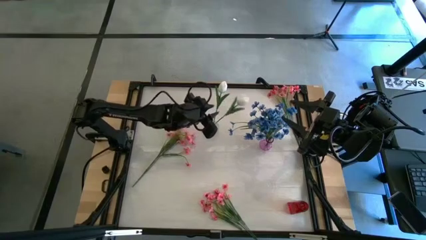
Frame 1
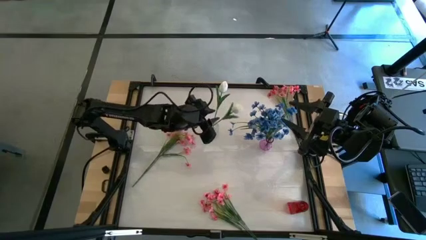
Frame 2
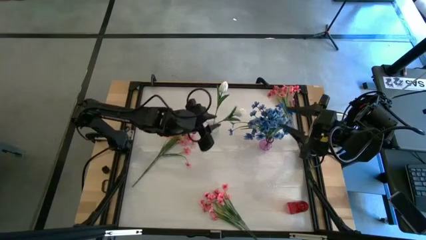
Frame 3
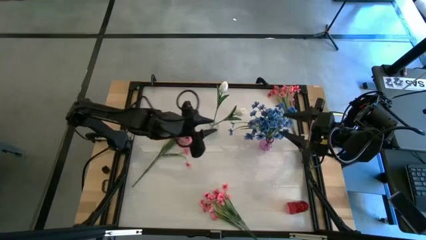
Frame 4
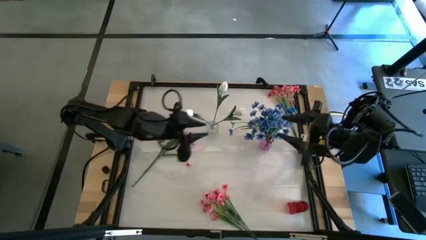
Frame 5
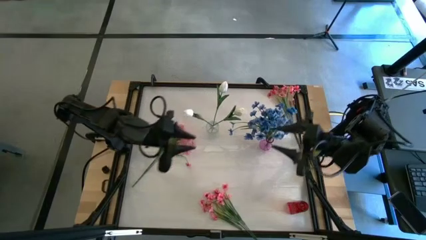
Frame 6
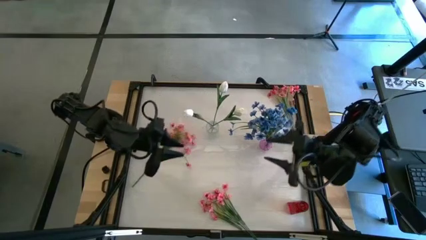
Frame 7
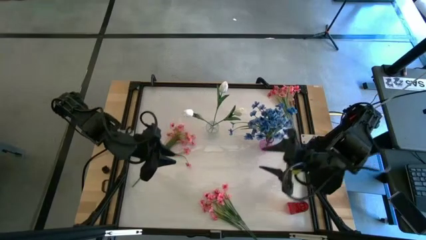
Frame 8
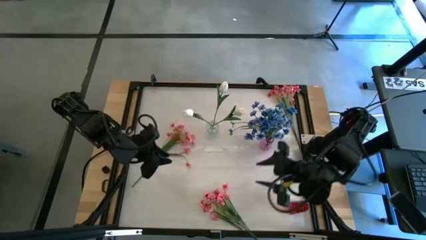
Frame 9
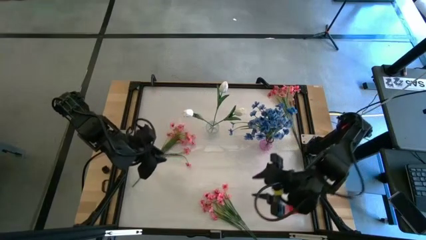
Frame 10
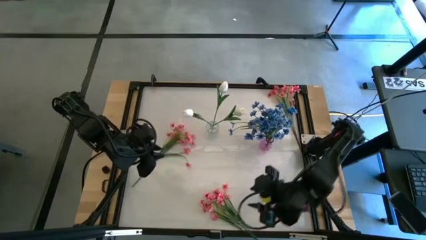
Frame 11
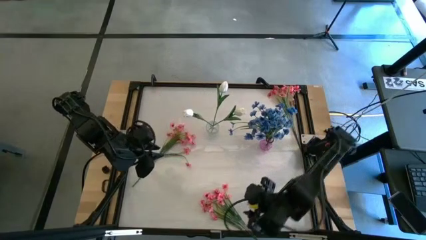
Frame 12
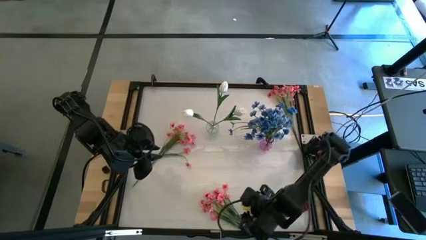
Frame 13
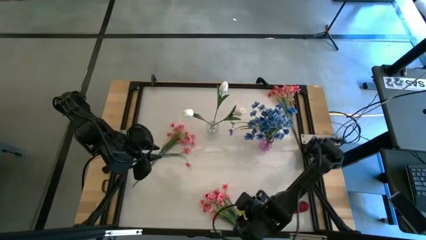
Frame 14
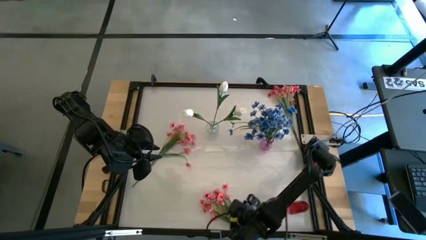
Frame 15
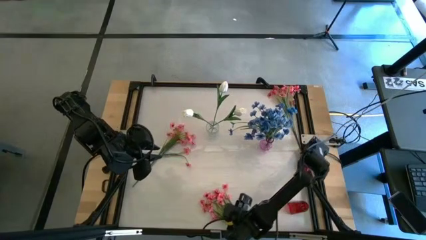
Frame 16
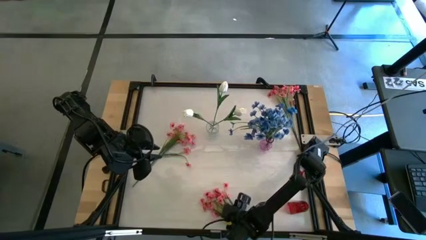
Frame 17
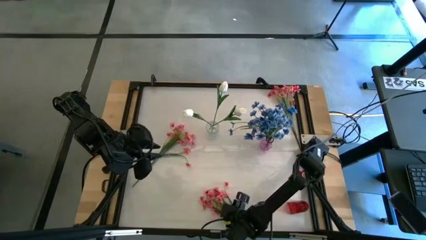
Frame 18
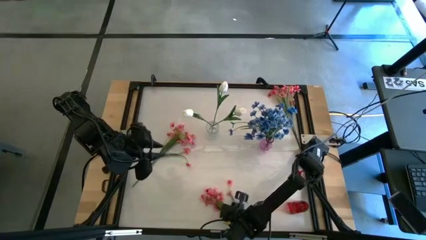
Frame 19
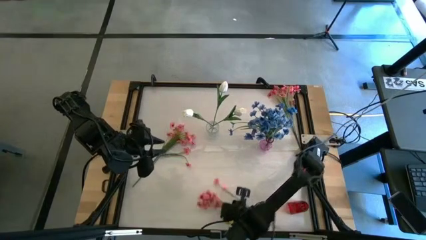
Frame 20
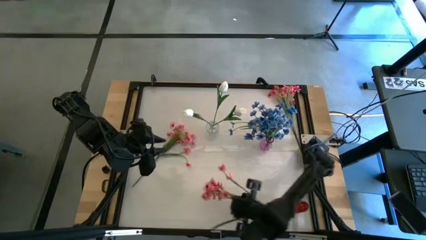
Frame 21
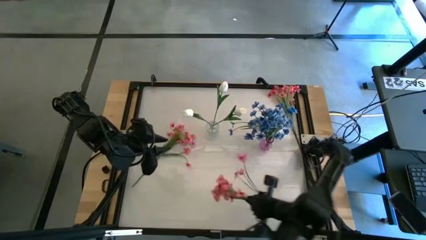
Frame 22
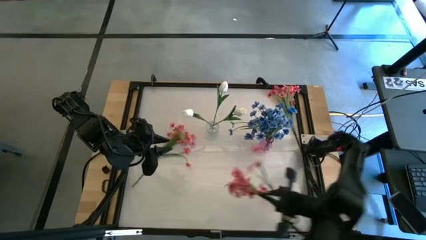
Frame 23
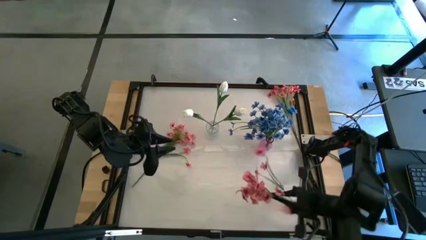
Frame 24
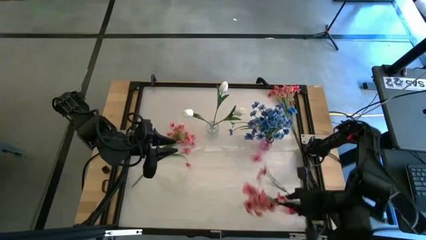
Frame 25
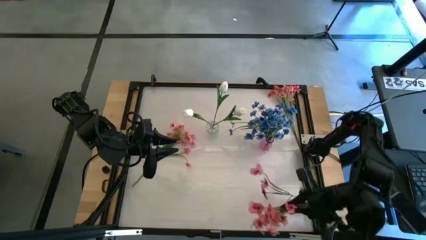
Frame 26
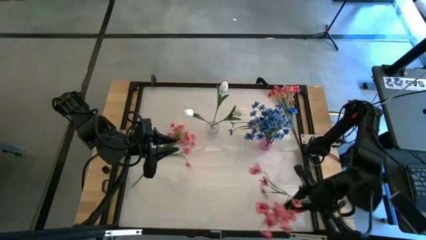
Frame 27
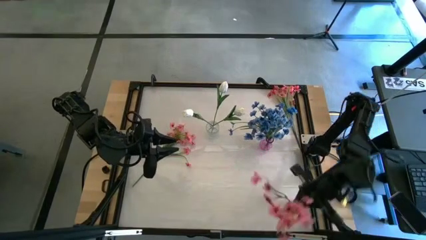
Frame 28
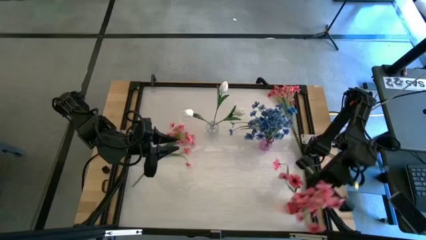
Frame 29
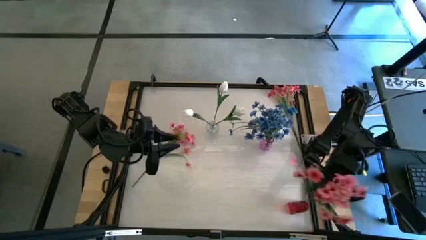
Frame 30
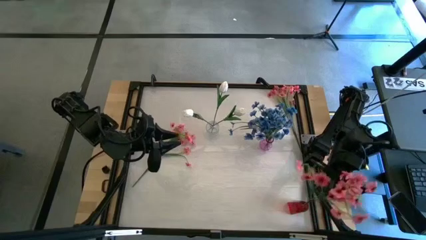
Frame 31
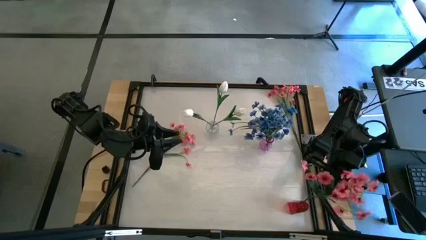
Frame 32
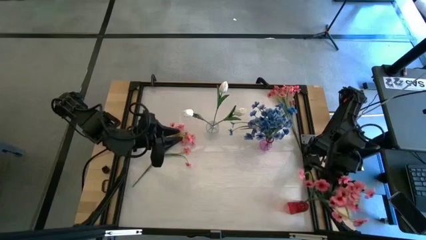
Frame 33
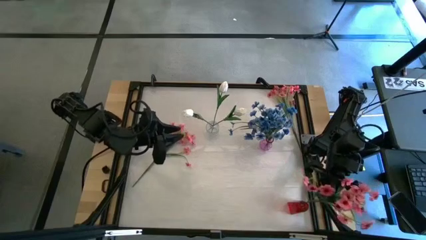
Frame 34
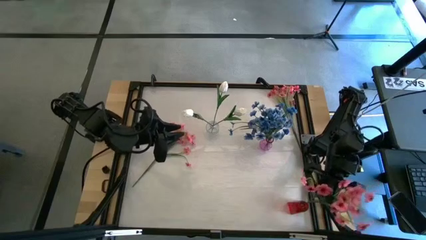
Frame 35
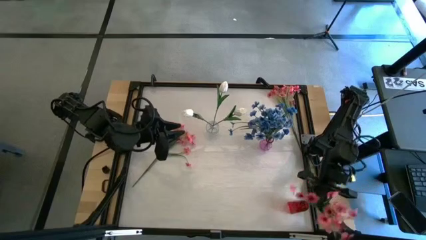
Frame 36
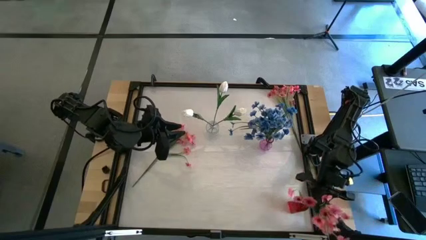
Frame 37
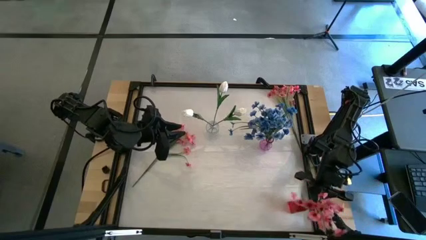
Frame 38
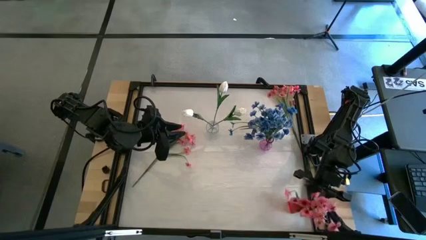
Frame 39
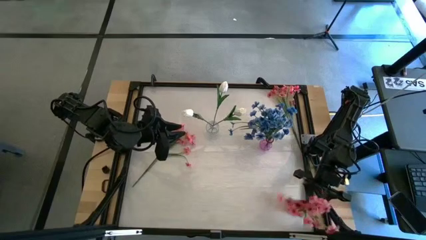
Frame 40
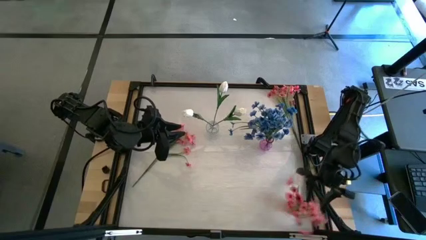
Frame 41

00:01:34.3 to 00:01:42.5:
Task: Sort flowers into vase by color
Put the bottom pink flower into the red vase

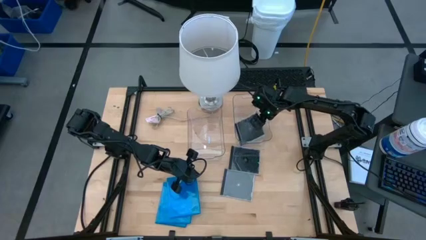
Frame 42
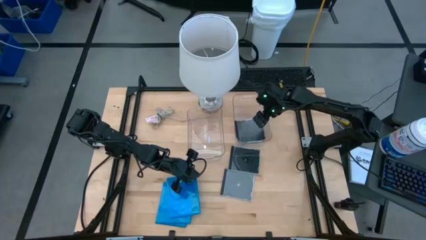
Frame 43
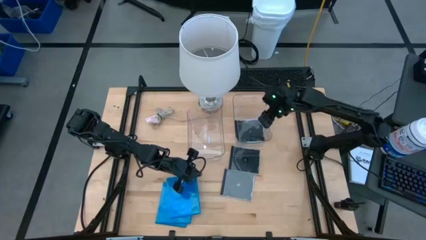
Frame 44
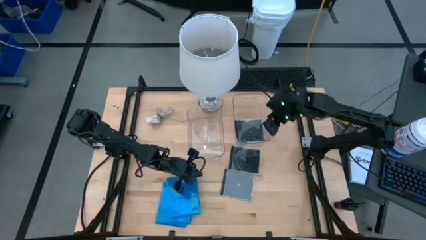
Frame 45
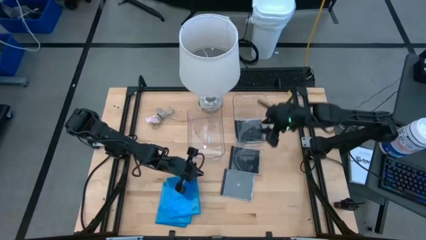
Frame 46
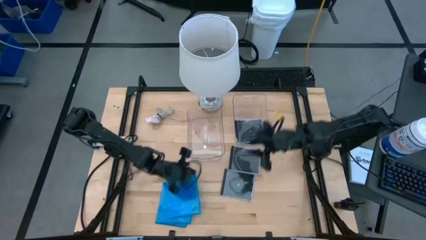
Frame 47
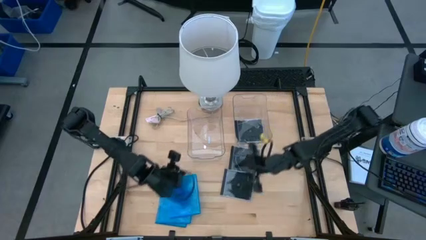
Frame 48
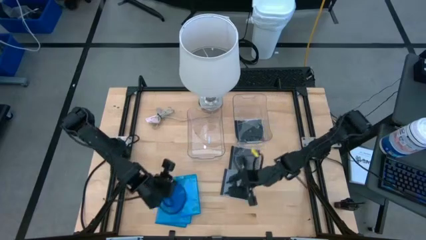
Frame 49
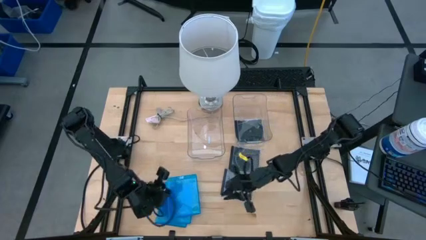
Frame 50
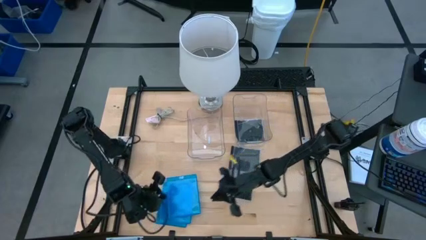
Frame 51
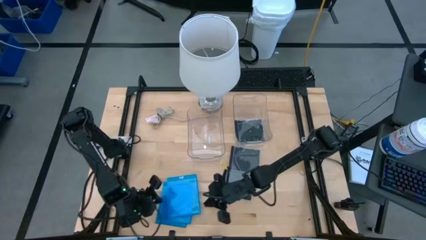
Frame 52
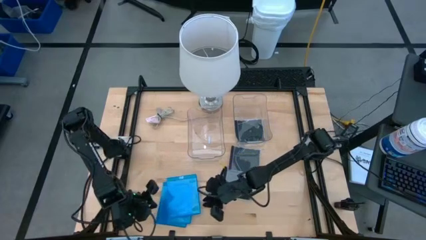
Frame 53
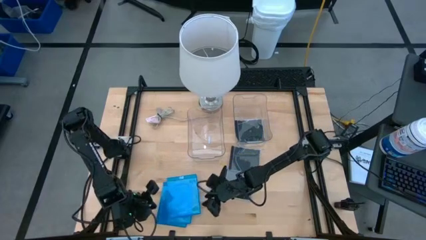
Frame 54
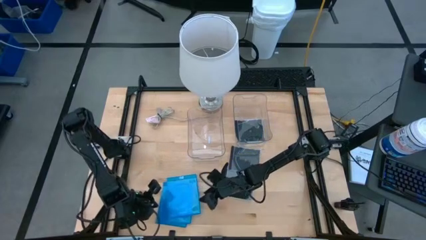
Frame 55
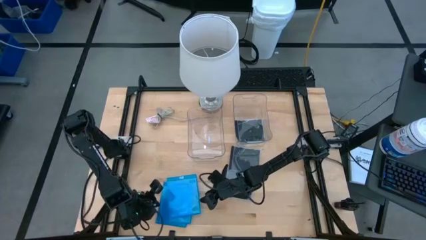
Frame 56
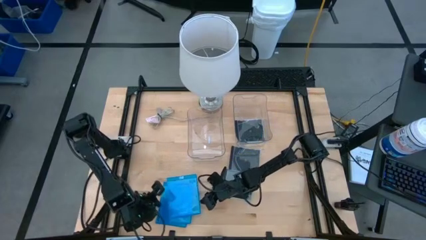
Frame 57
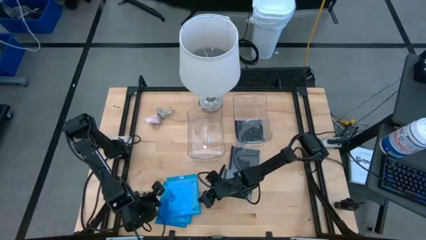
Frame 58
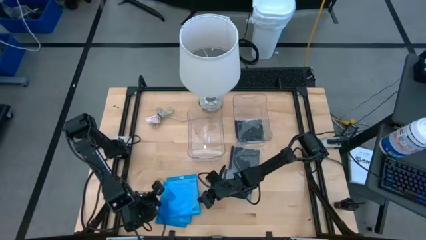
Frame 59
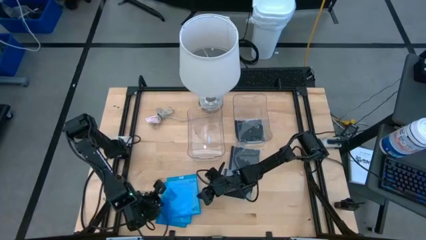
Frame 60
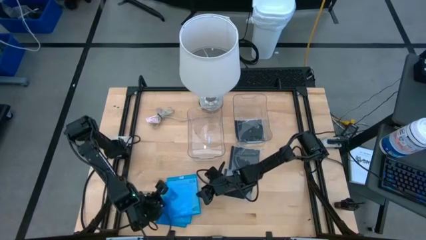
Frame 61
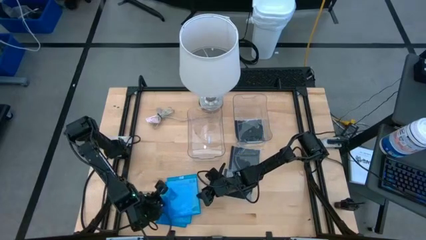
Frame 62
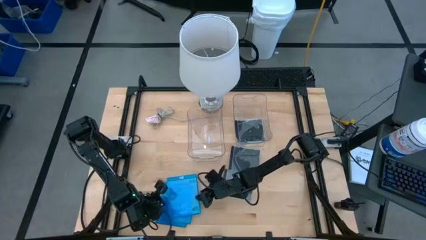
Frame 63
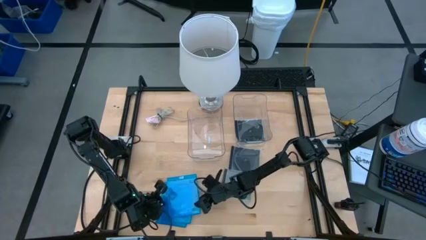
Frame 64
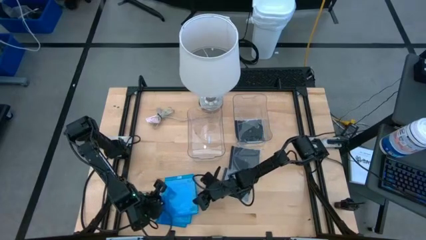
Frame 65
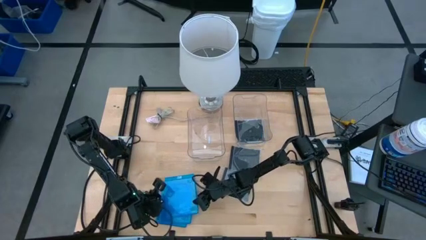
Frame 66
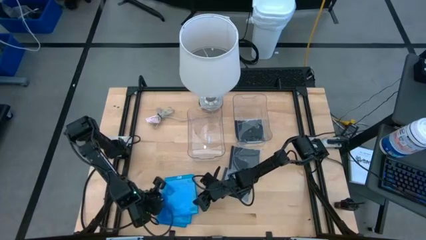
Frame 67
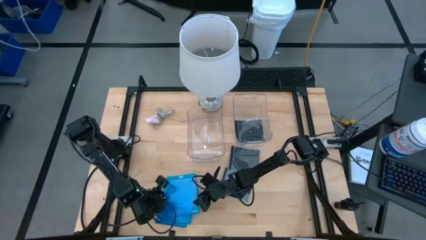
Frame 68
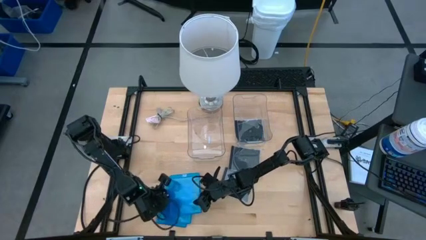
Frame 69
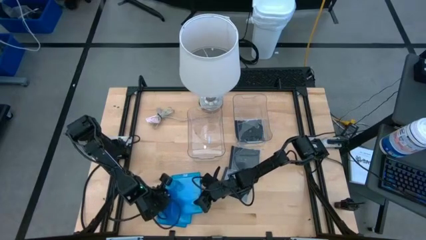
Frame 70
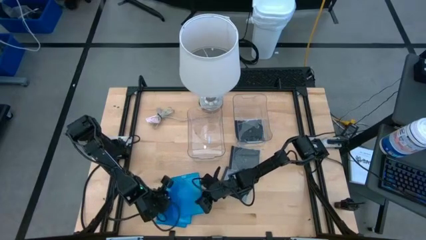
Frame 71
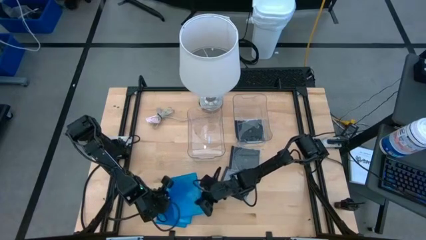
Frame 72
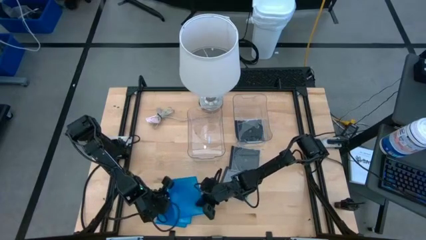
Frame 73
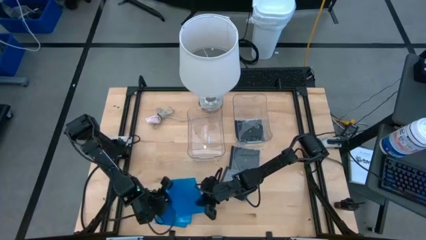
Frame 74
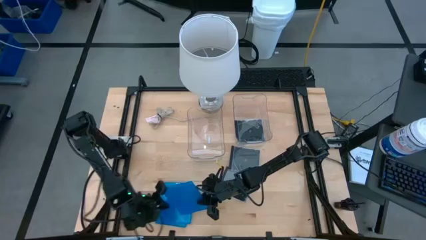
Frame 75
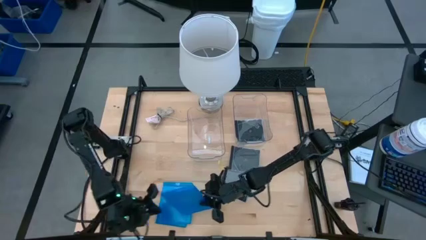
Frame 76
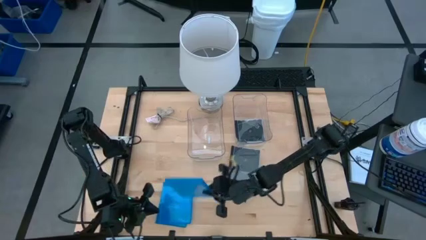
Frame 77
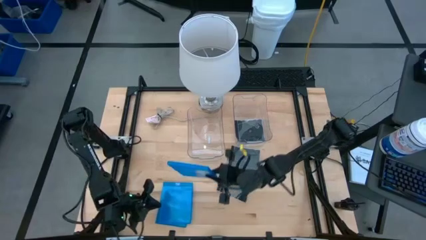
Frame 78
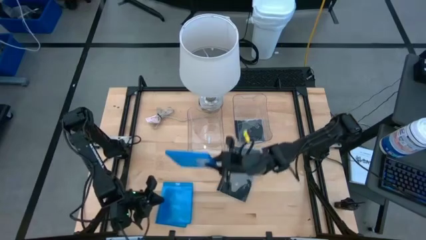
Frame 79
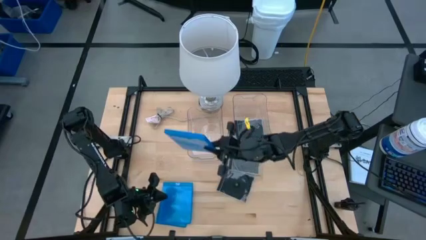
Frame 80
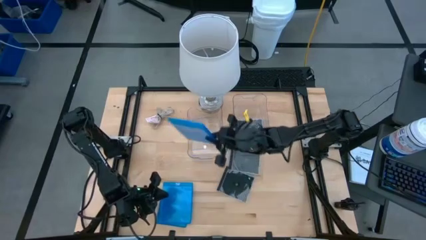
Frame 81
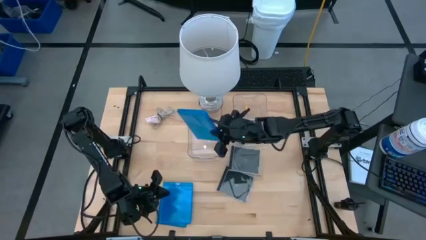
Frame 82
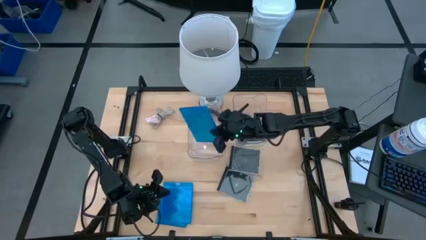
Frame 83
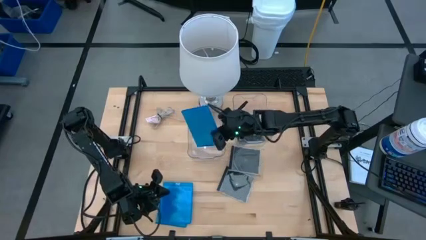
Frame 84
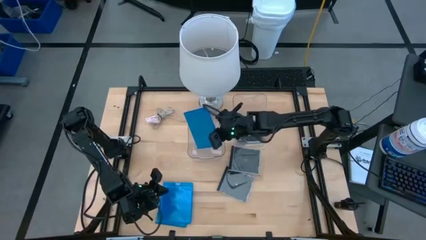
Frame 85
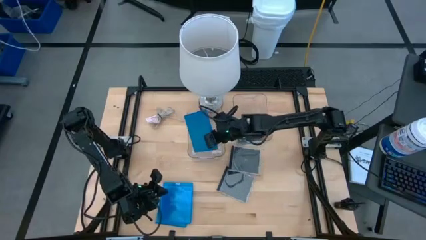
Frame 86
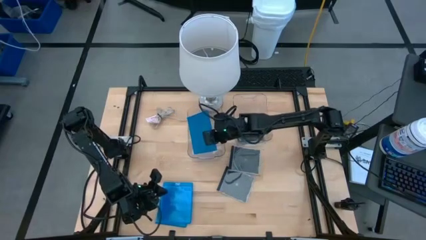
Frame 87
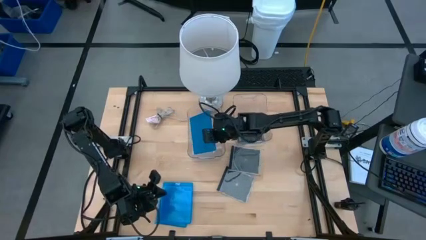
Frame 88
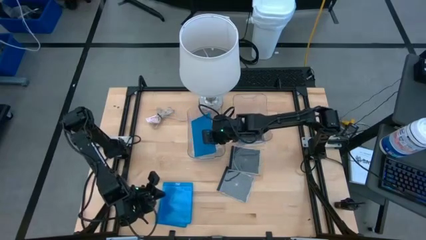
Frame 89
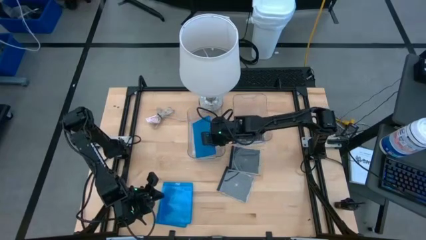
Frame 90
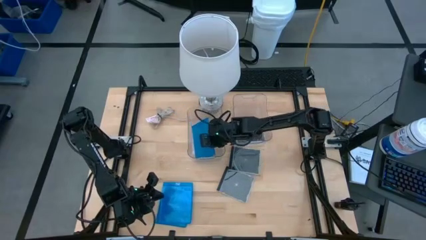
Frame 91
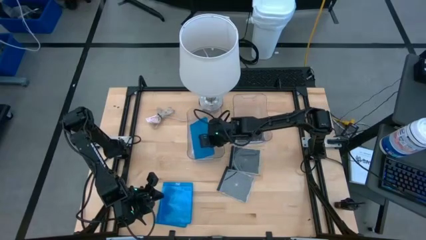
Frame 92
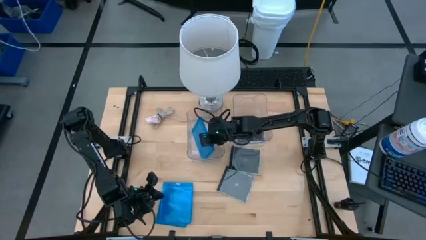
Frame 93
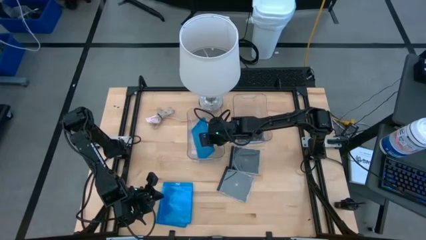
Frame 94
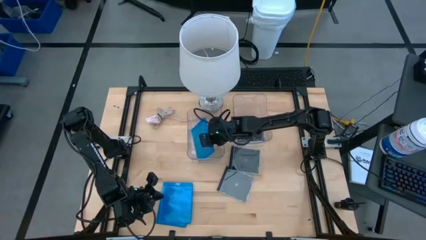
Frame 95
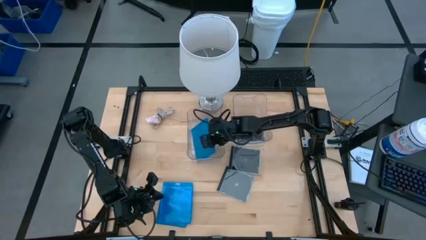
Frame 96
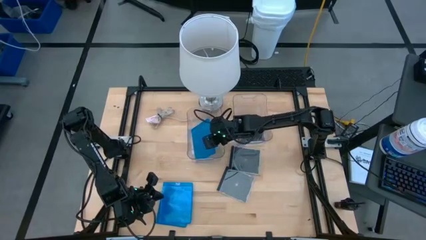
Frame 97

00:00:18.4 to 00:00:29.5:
Task: Pick & place jewel cases by type
Put the blue cd case into the left transparent bin
